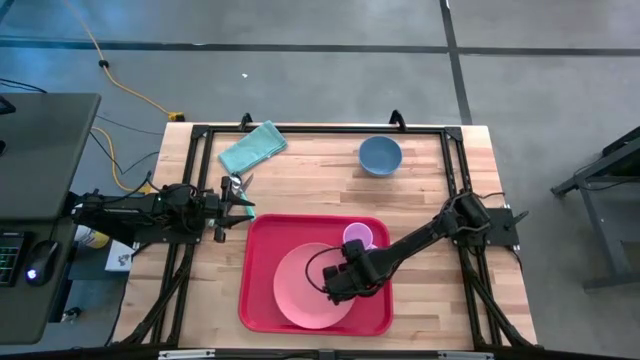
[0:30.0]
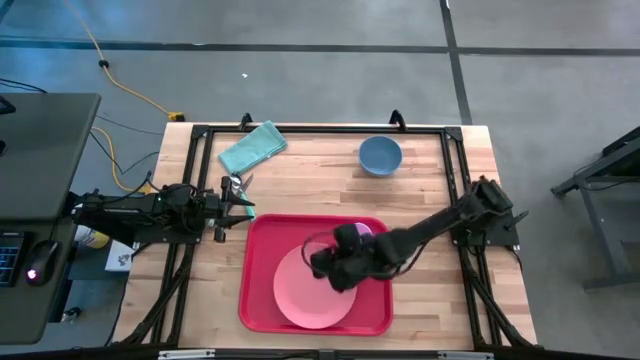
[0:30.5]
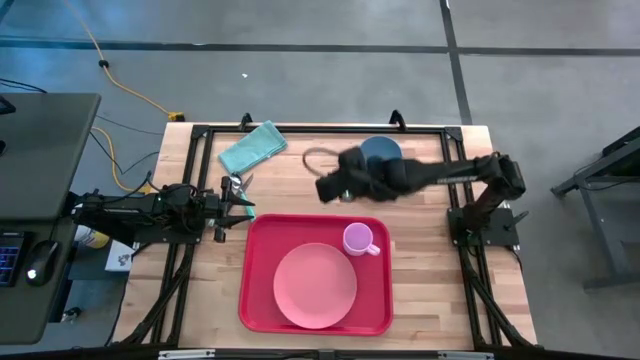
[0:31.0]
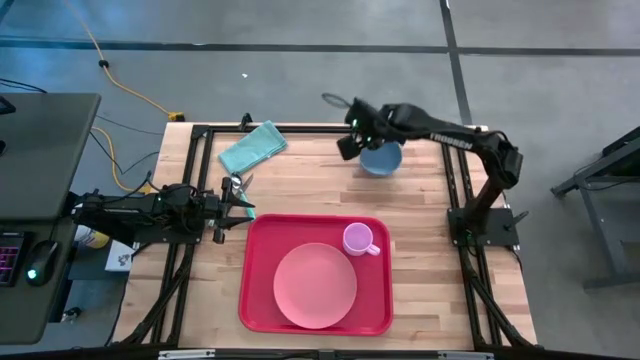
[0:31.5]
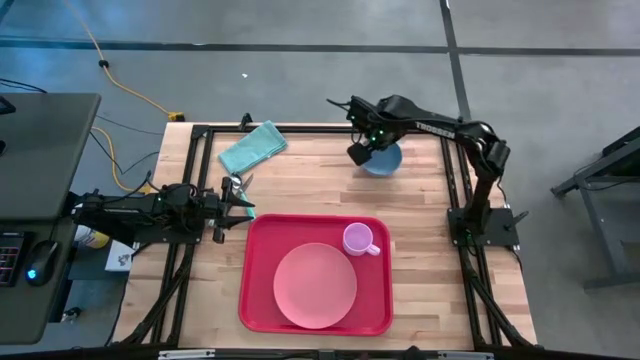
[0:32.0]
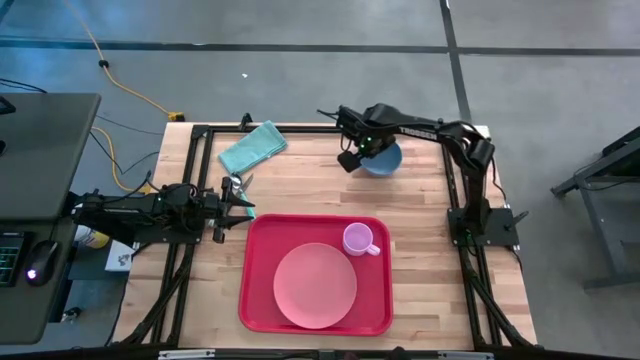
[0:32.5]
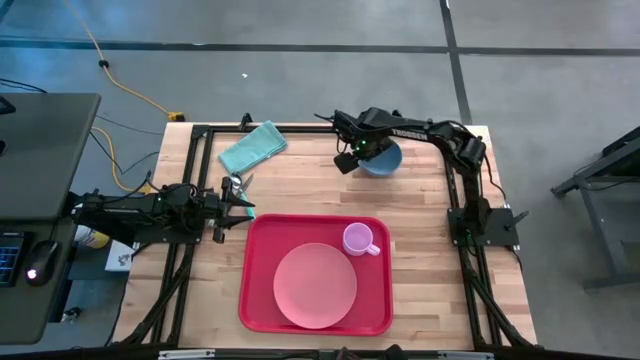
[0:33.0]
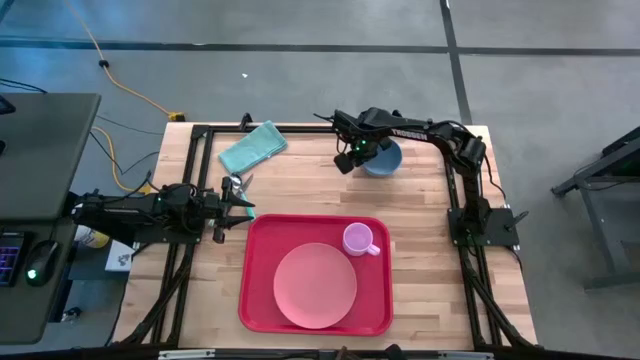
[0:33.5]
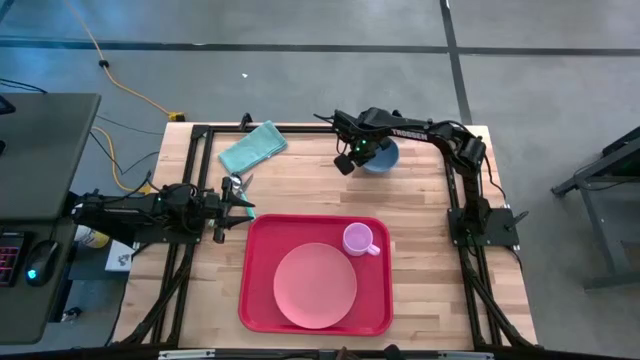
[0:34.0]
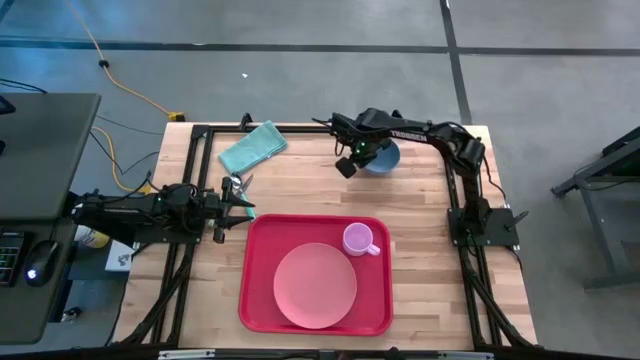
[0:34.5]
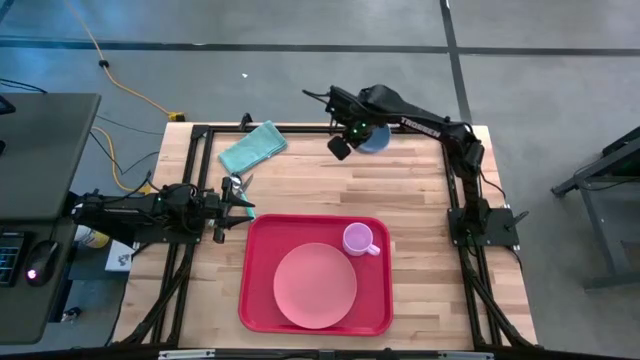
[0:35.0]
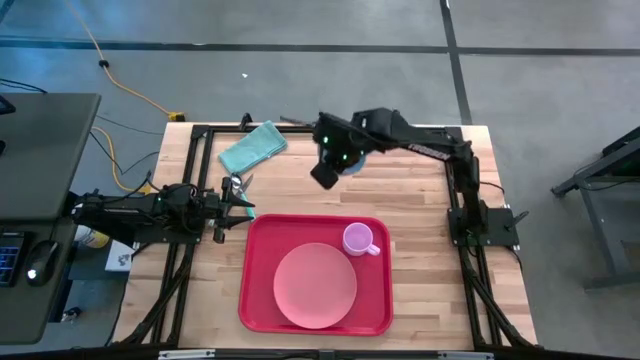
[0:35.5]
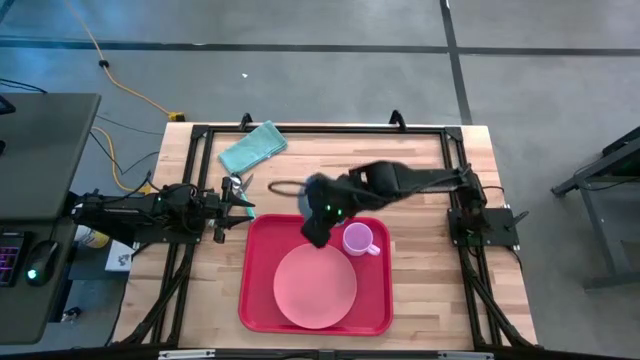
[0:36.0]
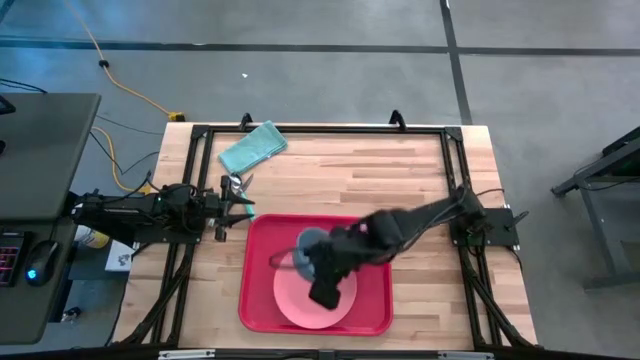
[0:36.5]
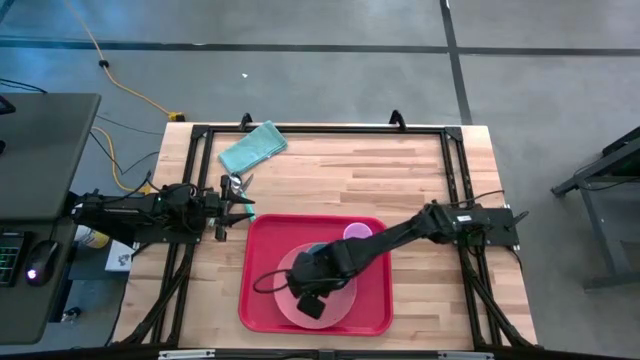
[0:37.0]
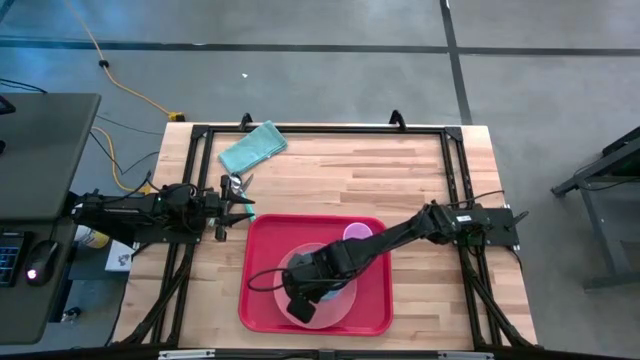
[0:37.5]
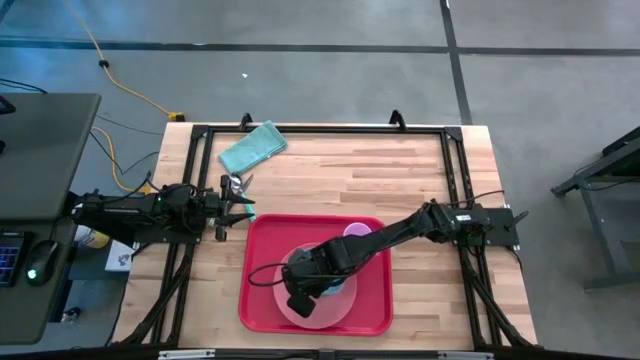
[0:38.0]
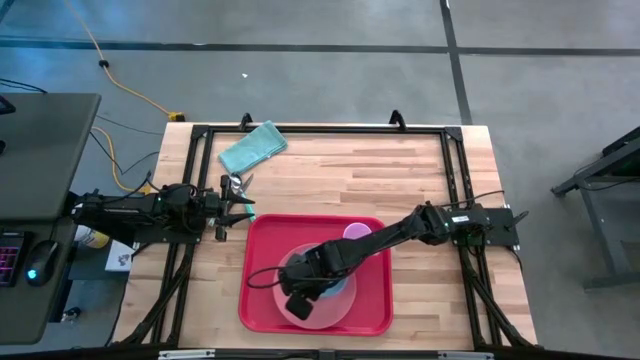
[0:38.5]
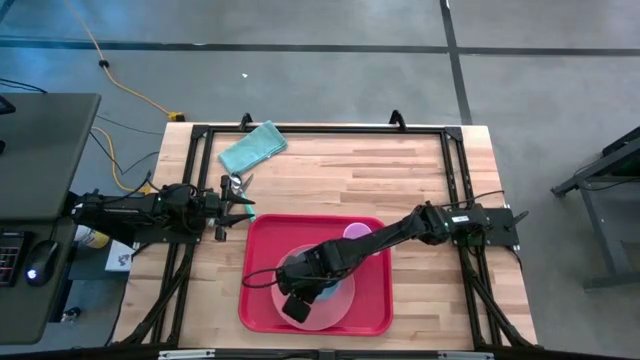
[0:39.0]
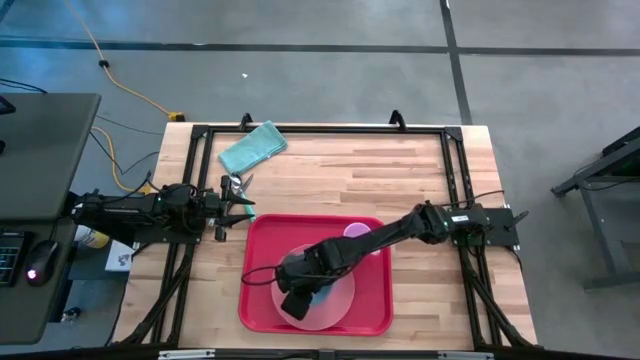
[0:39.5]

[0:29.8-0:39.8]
Task: Set up tray
Put the blue bowl on top of the pink plate

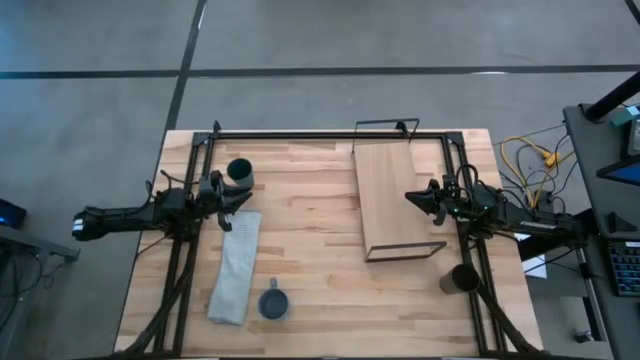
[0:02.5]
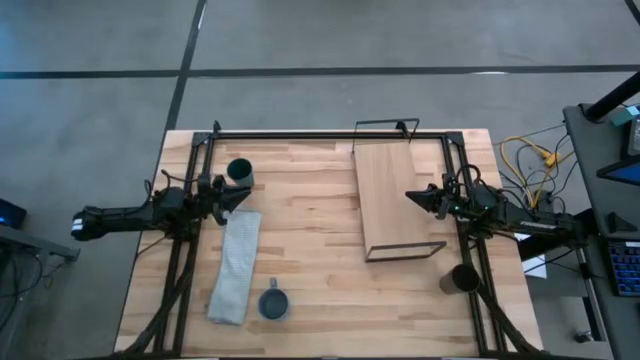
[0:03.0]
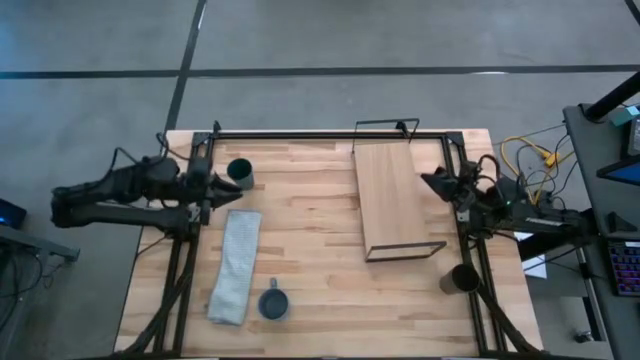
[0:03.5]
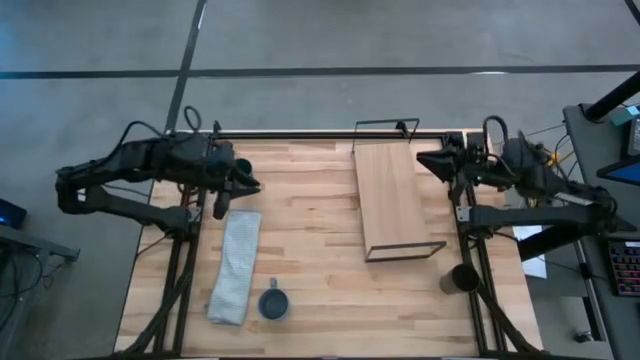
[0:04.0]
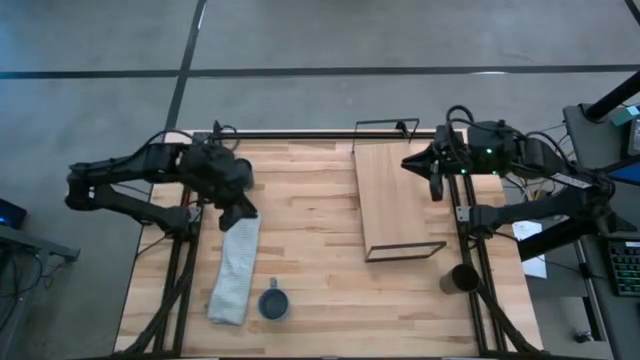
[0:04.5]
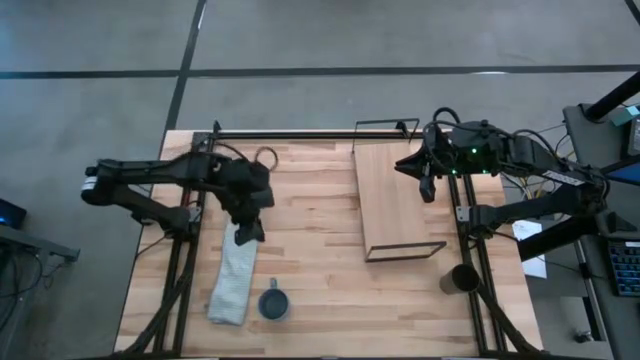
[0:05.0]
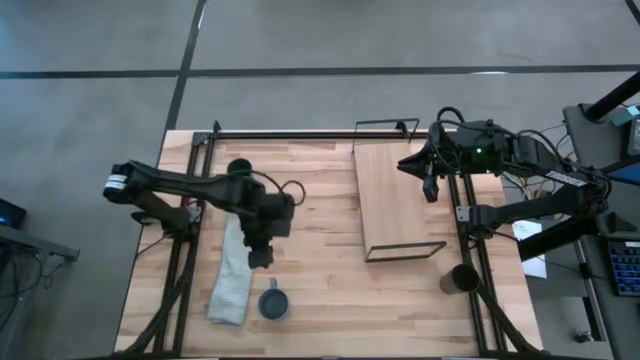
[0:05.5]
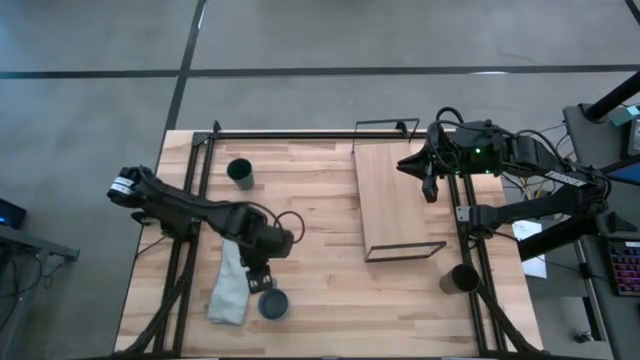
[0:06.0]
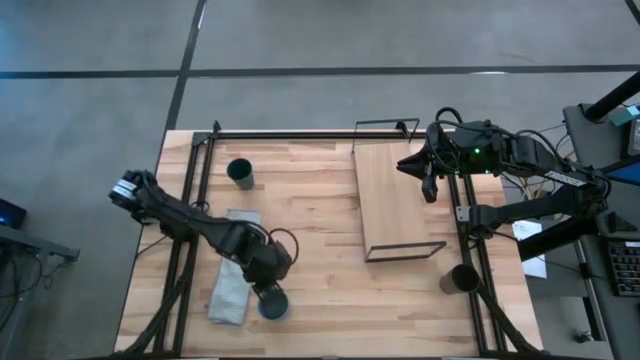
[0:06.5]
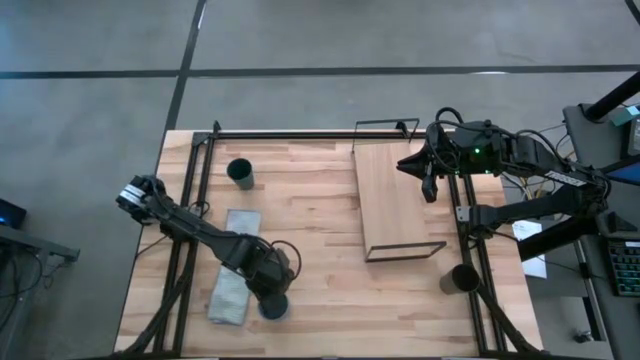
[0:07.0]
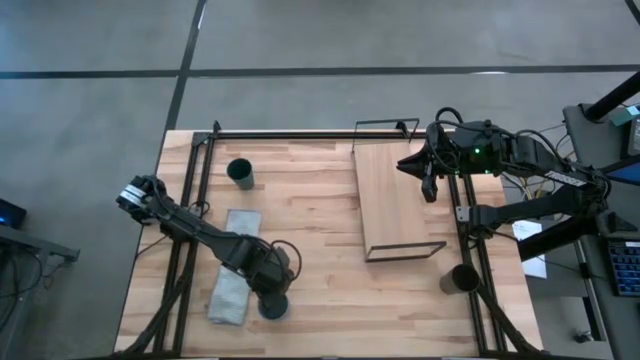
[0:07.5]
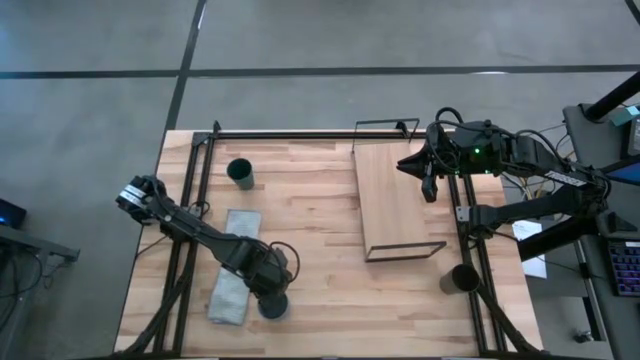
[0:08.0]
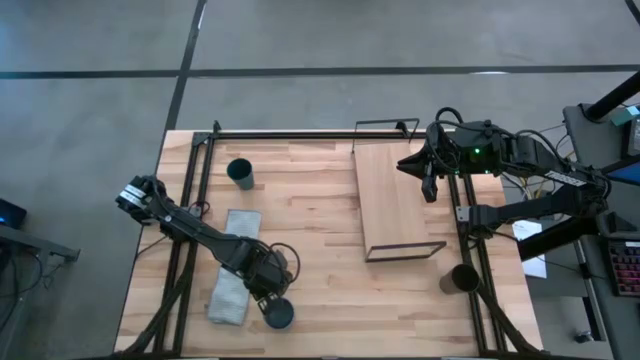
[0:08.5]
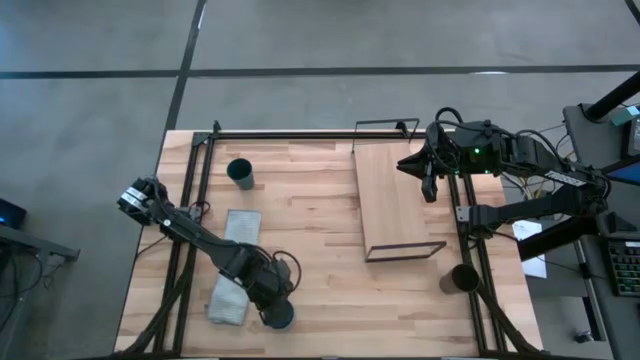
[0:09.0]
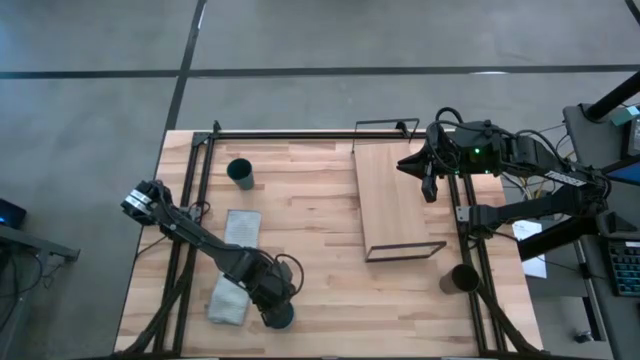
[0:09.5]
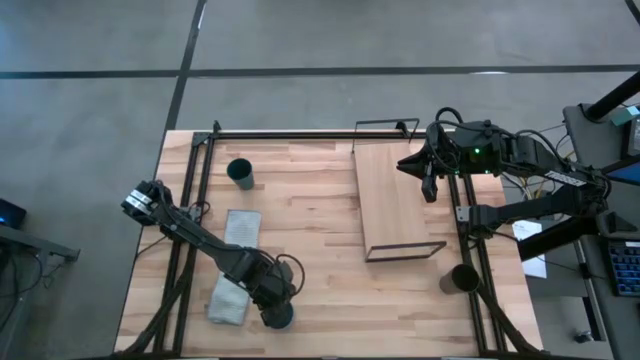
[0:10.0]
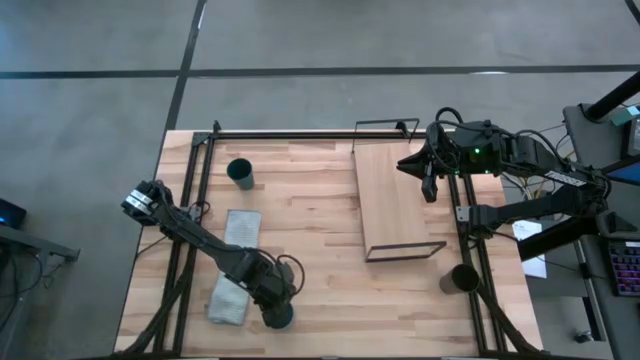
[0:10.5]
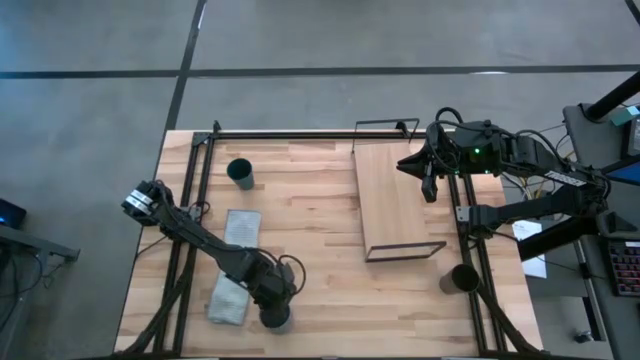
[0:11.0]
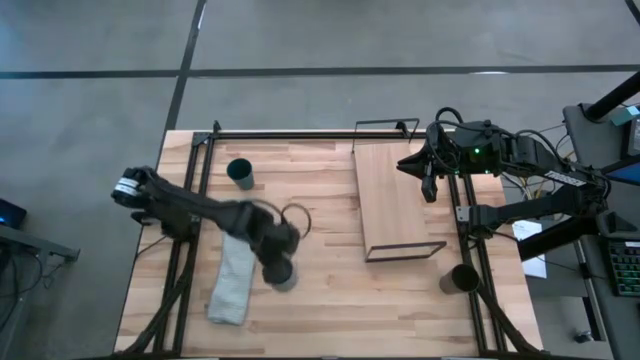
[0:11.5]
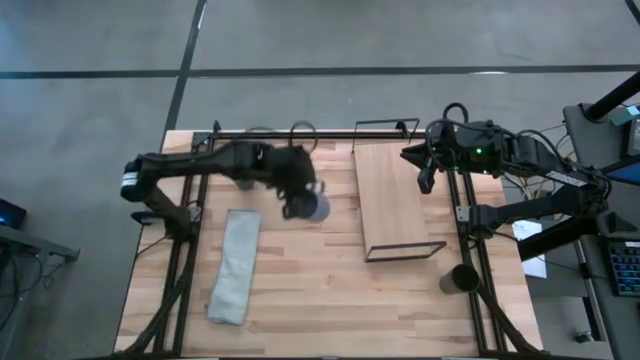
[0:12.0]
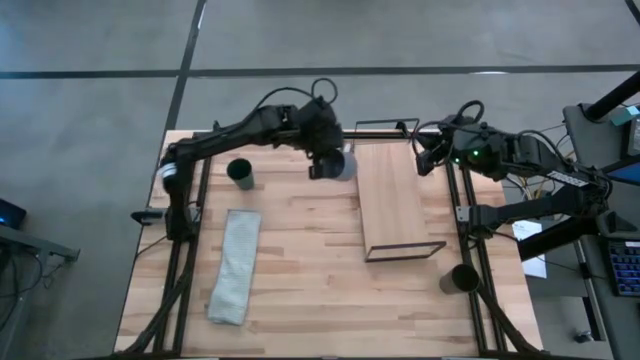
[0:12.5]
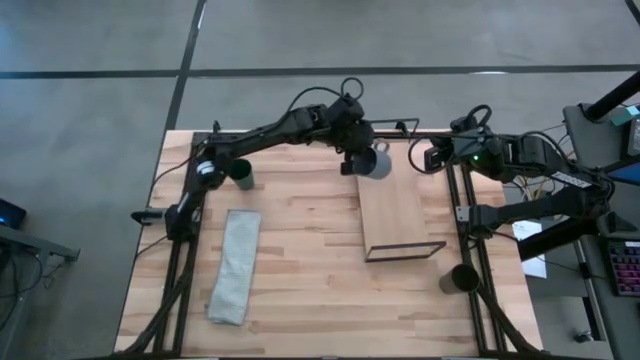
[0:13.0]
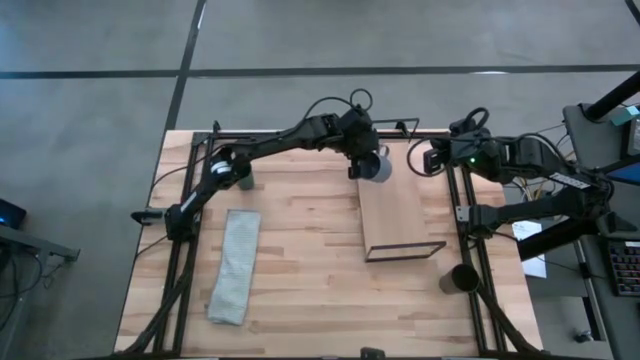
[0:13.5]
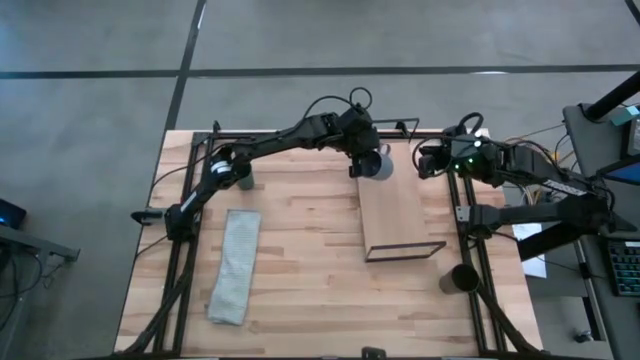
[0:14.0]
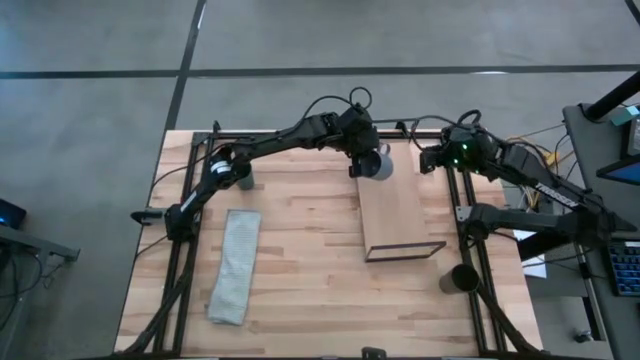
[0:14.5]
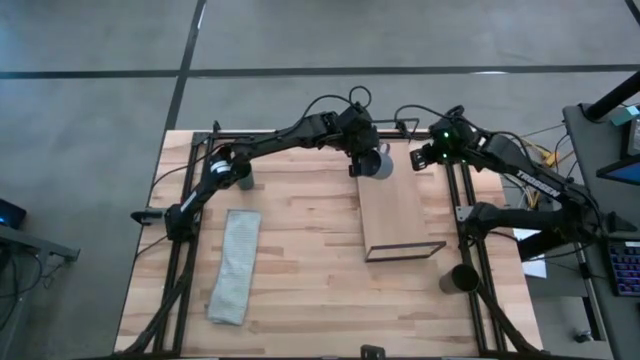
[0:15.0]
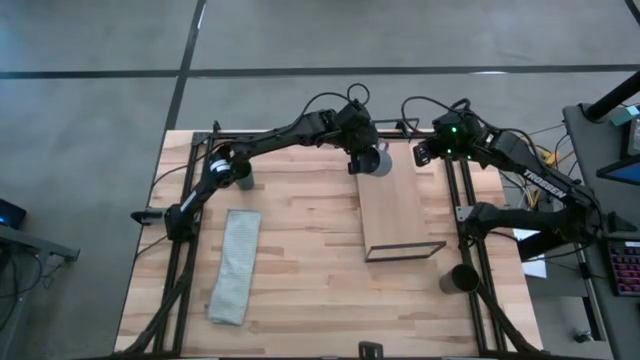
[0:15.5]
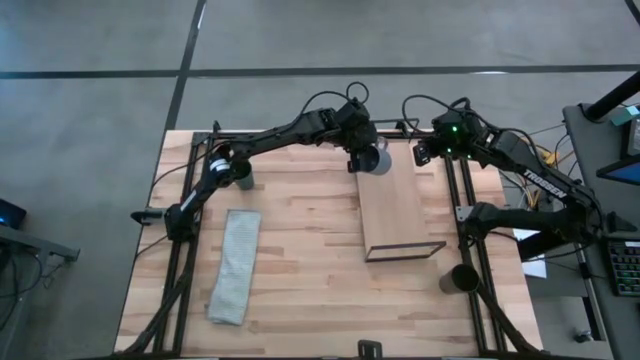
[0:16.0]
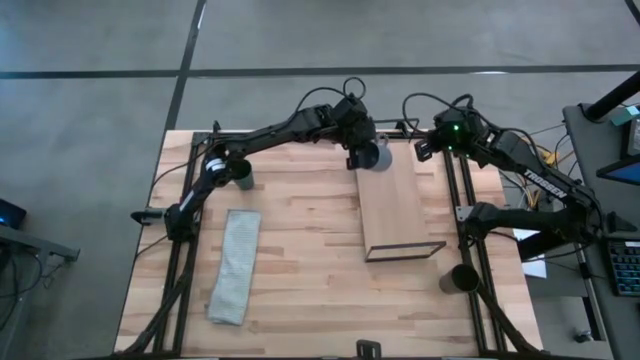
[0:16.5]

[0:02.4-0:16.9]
Task: Stack small to large cups/mugs on shelf
Put the gray mug on the shelf
